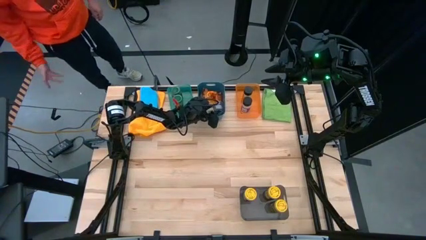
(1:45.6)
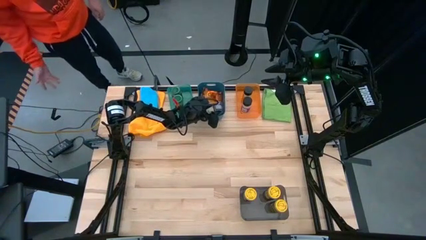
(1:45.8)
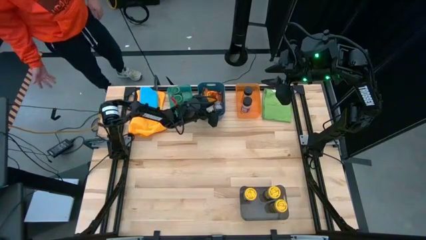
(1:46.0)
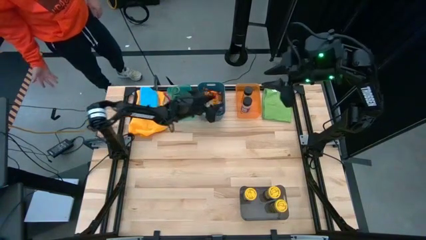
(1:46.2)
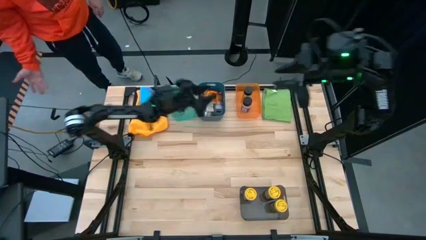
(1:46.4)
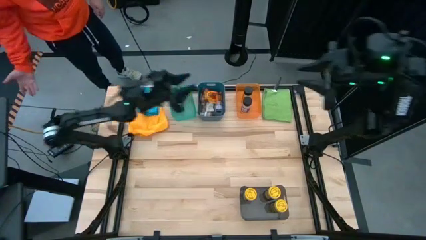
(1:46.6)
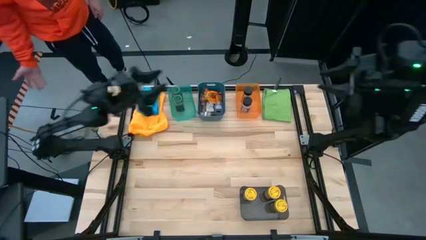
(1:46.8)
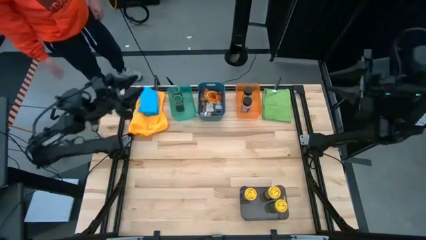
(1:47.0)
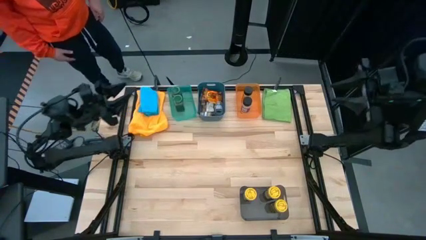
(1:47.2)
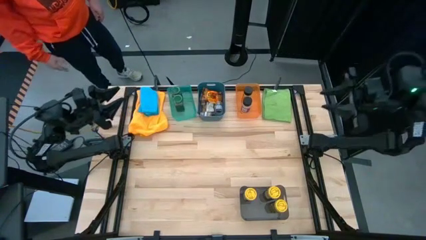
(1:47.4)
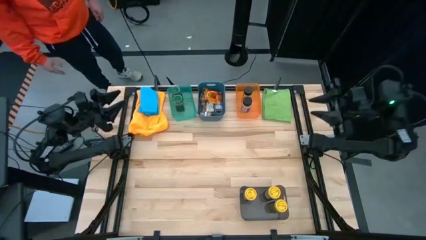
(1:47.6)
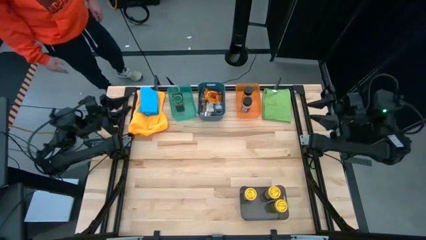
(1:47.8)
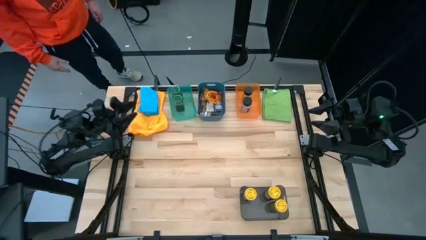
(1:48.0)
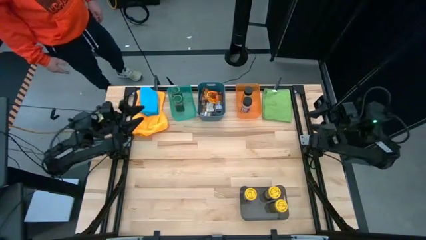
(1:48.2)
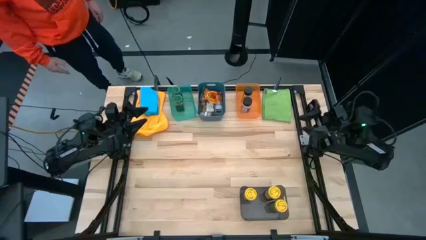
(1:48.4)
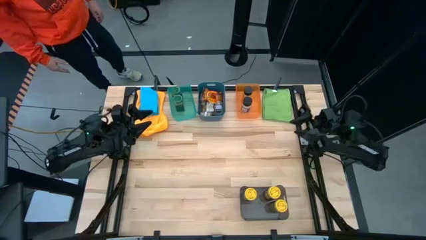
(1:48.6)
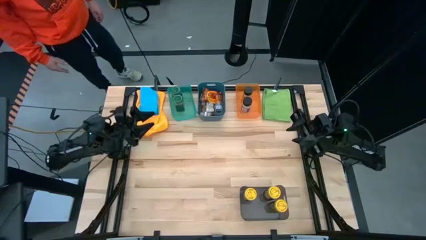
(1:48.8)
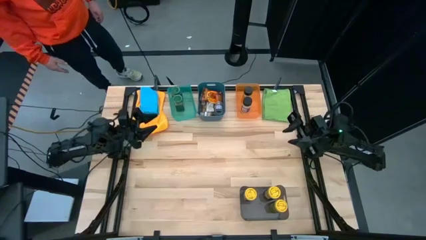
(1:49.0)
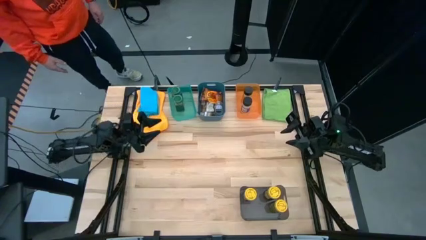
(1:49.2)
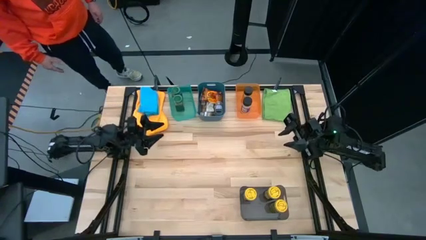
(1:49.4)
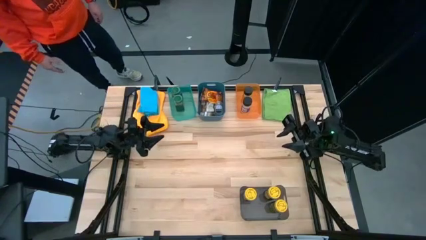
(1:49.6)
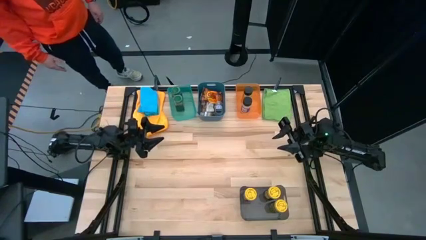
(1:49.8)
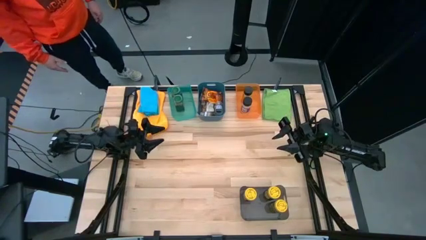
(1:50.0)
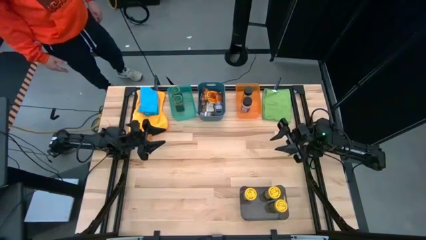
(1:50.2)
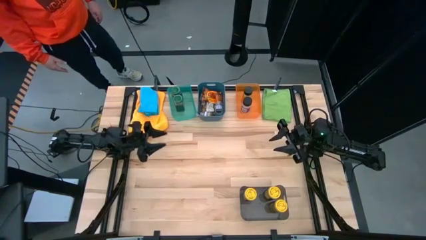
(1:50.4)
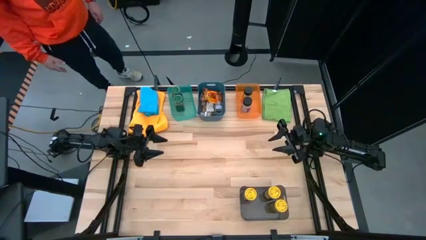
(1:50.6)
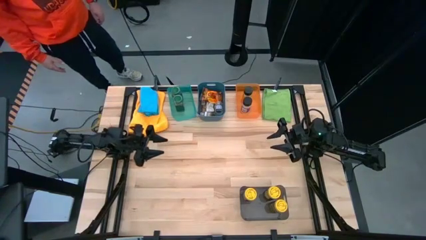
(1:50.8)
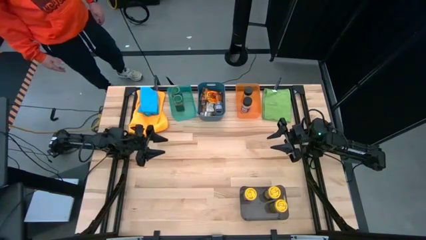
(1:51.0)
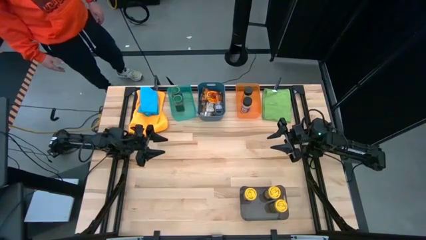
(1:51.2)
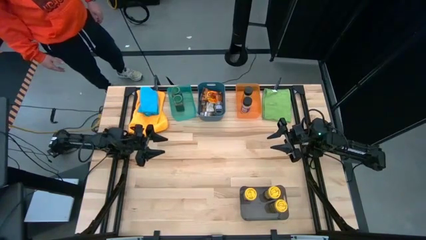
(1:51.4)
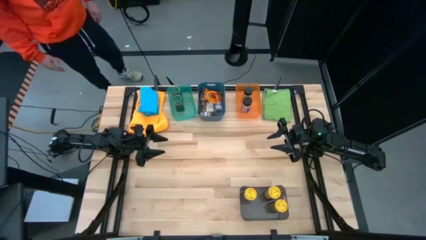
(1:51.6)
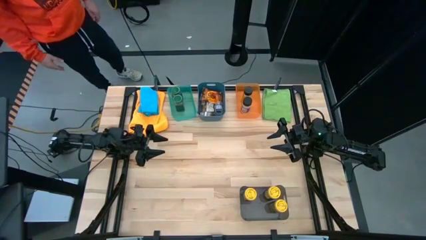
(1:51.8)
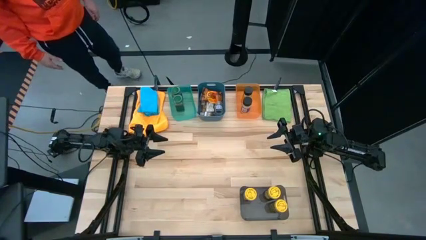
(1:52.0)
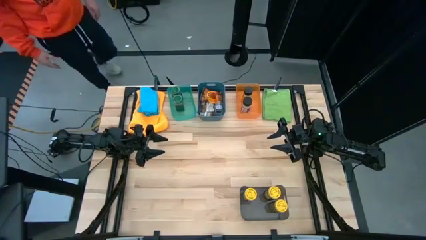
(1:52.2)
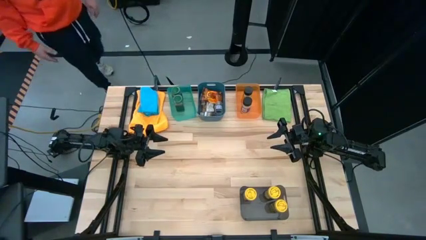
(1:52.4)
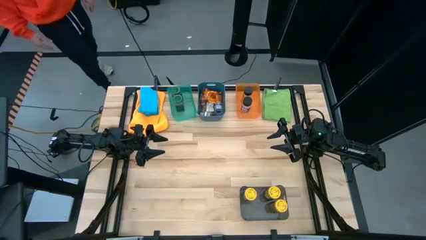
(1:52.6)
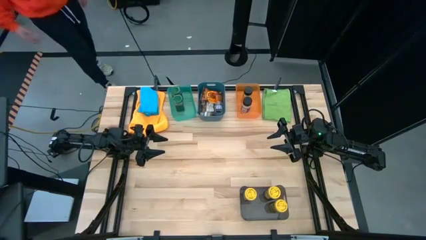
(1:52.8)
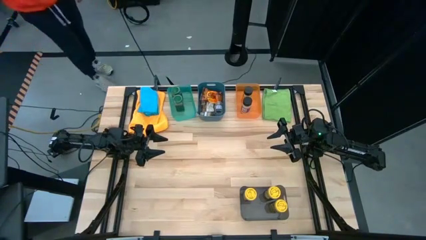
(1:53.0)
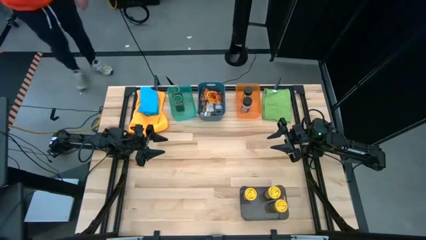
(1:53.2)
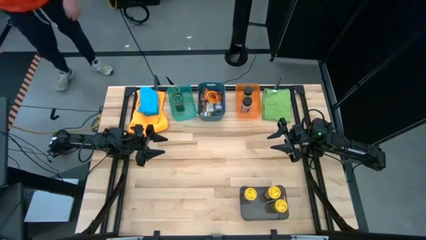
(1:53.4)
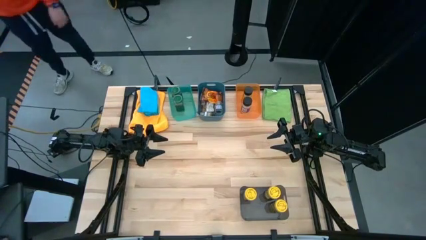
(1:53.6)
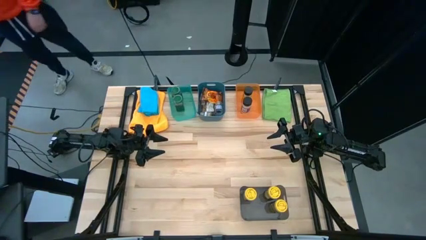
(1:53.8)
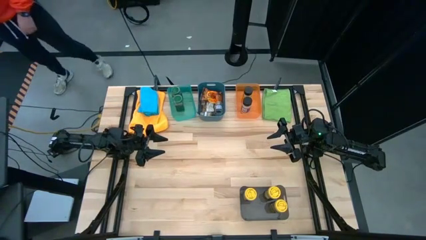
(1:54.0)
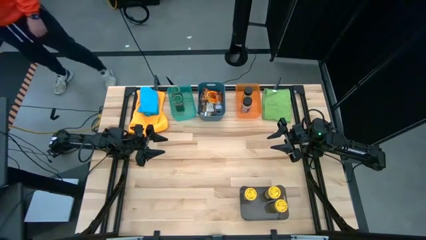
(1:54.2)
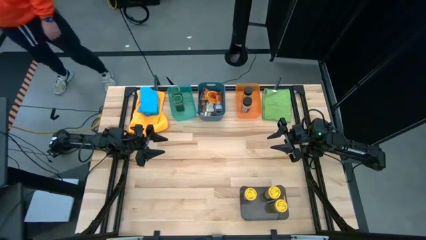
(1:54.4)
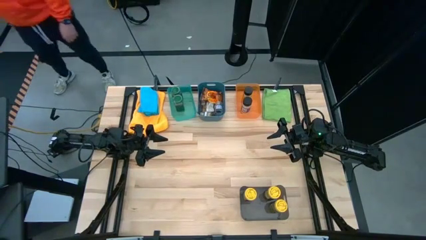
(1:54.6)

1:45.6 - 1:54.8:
Task: Sort spices by type
Return to Home Position

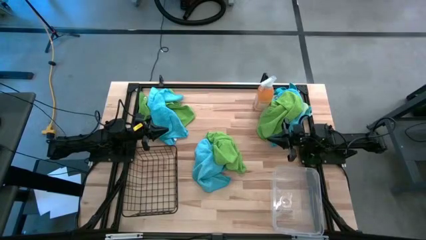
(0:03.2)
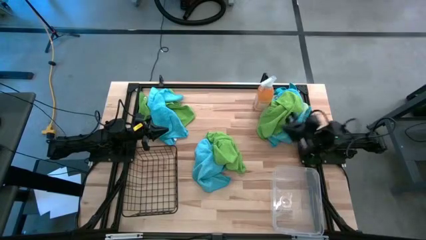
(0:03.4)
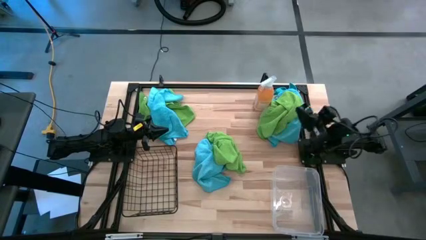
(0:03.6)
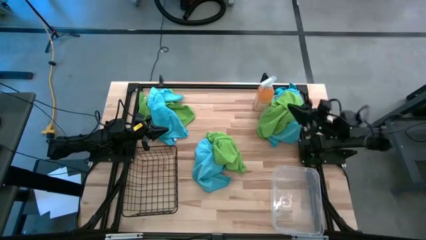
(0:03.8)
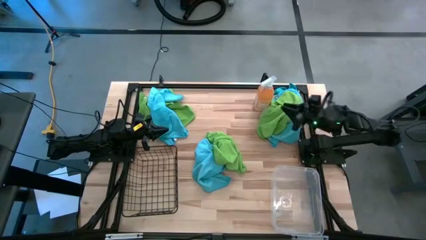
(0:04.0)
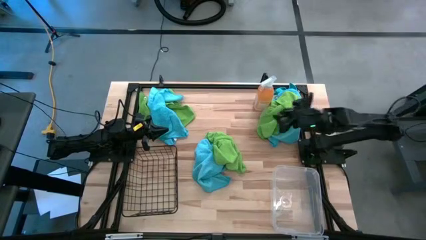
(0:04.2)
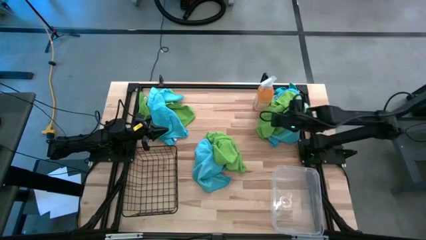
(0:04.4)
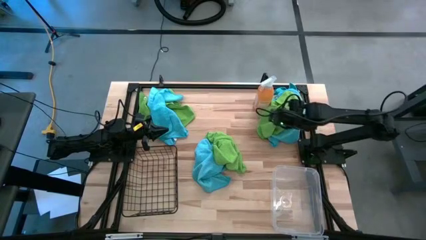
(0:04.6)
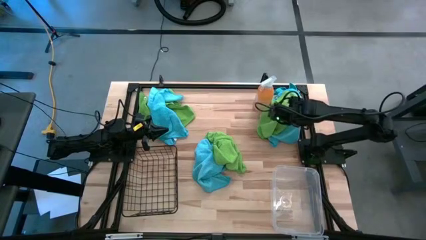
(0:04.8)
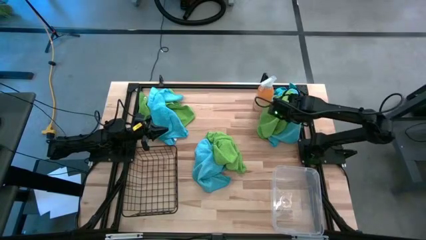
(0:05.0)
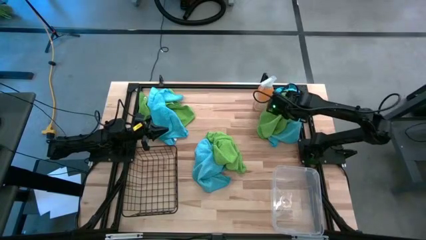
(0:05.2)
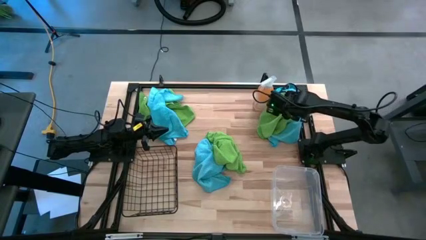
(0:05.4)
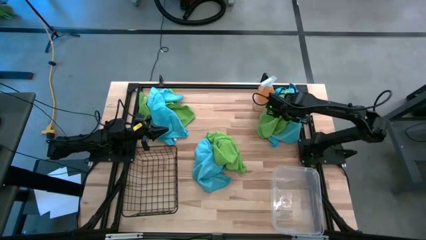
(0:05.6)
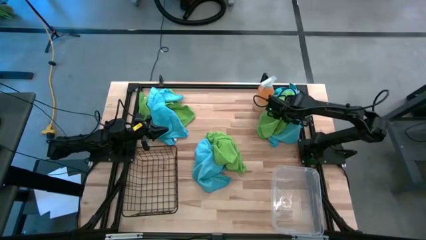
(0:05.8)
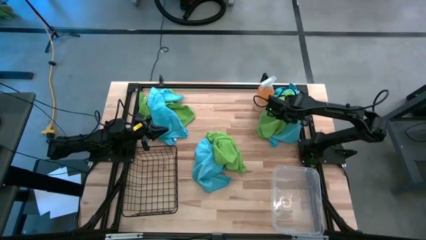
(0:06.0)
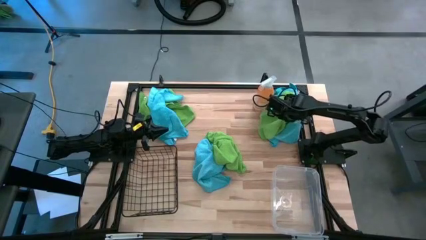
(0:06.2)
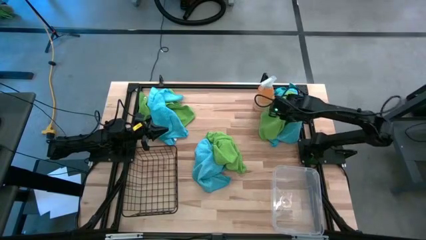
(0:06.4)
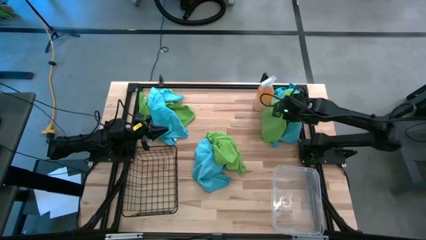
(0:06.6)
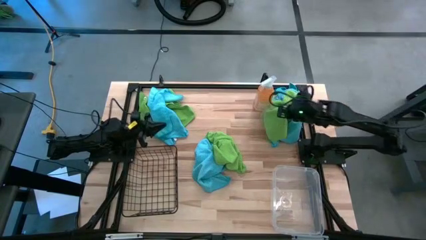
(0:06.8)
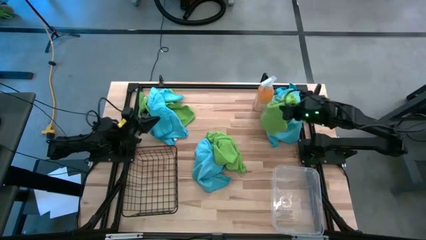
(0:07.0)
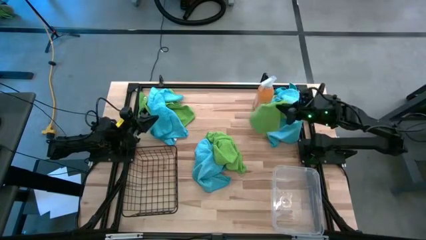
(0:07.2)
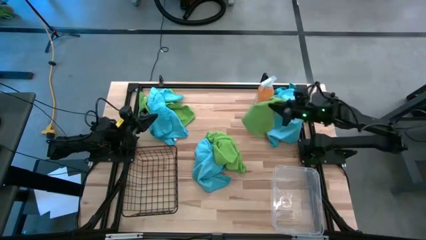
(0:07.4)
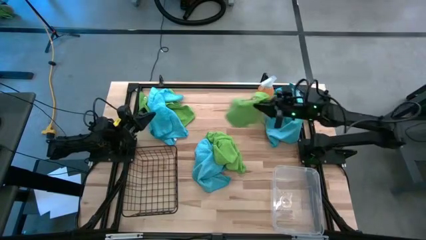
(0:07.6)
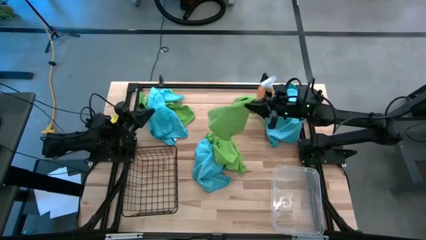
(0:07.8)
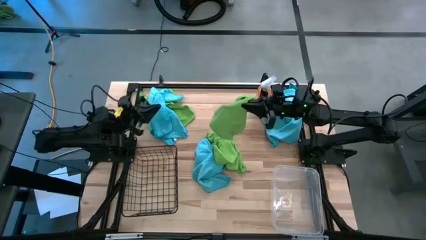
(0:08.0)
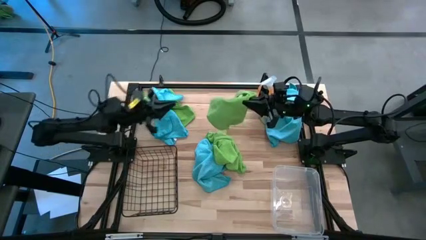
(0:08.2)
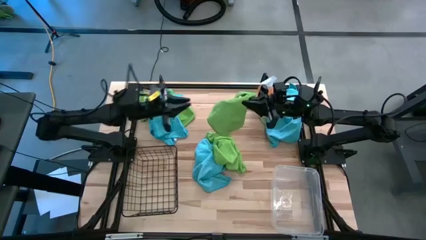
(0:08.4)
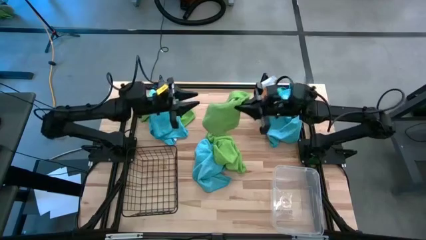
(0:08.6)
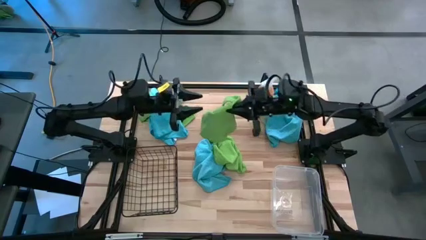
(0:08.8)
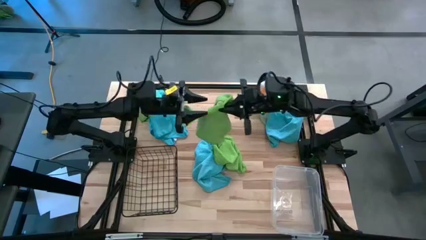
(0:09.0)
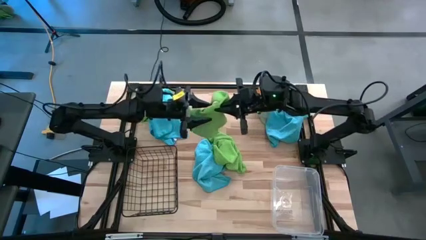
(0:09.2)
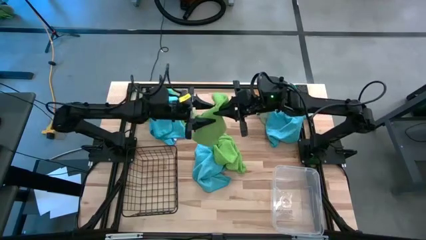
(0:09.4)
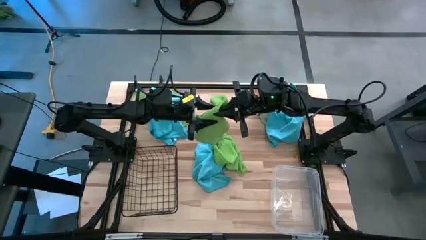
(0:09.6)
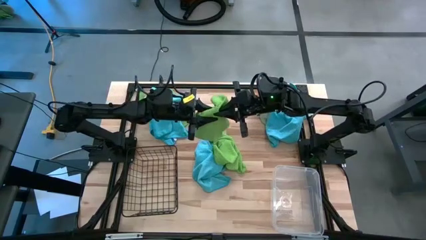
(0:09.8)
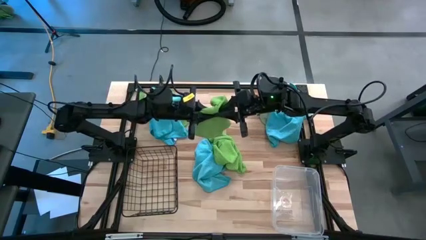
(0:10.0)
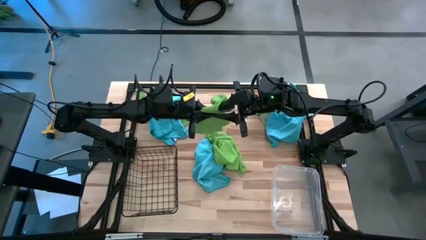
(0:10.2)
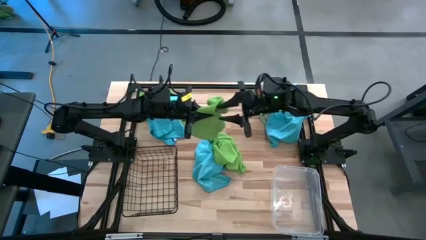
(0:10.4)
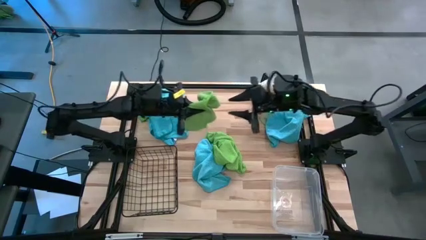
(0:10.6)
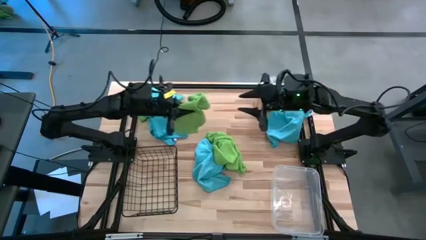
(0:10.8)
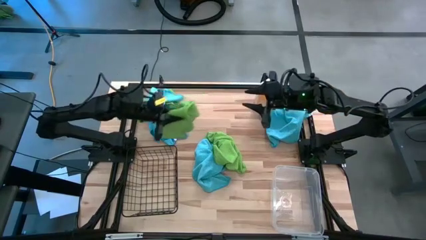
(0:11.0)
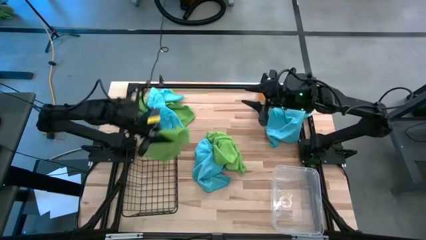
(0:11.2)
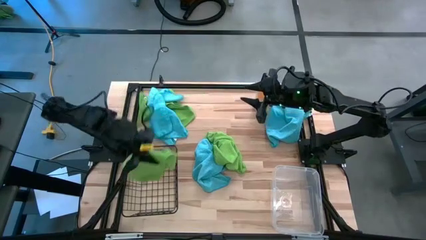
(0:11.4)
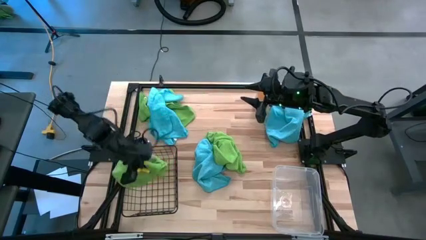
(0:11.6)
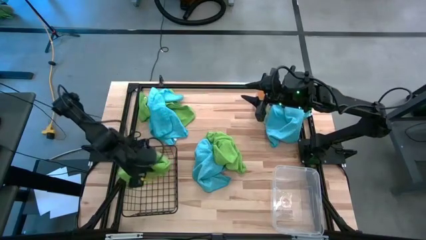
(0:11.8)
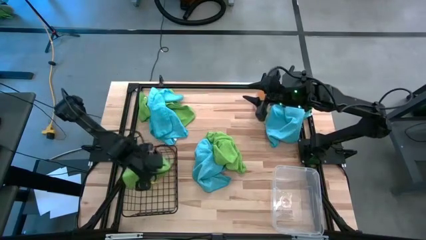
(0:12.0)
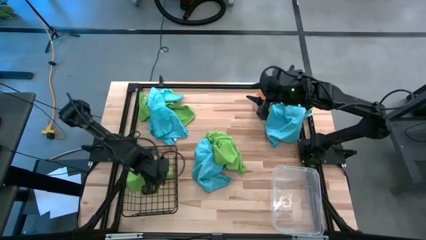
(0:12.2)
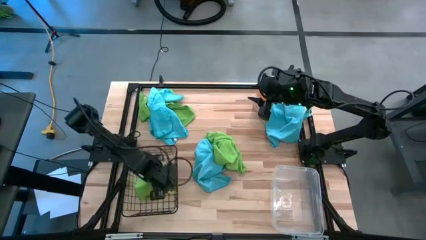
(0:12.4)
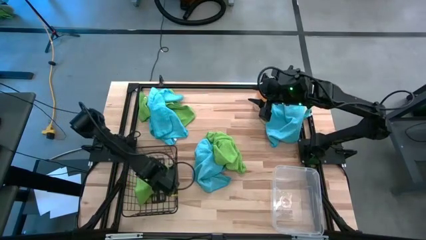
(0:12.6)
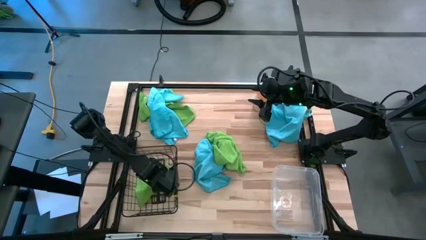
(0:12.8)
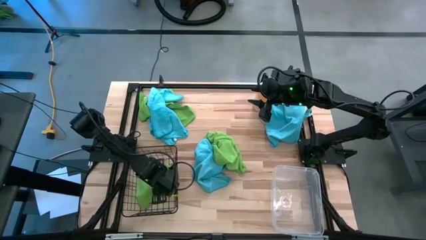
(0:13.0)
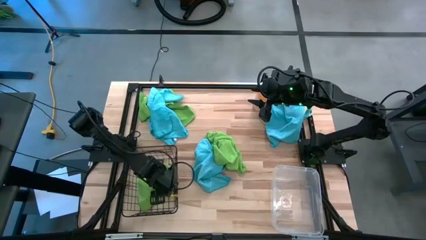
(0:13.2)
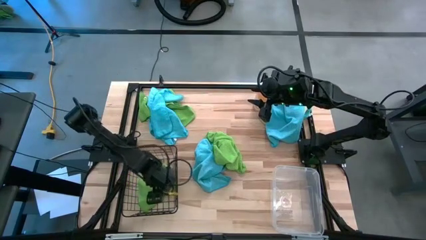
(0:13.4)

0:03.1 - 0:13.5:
Task: Sort microfiber towel by color & place in baskets
Put the green microfiber cloth into the black wire basket
